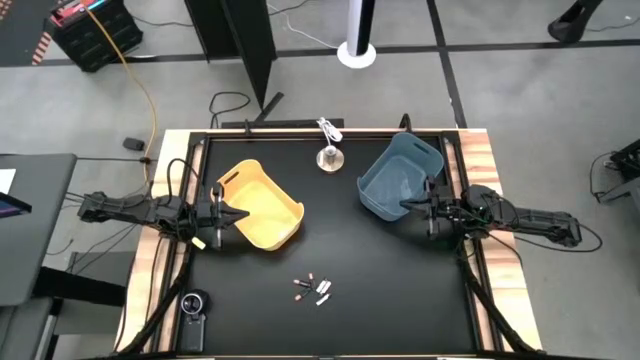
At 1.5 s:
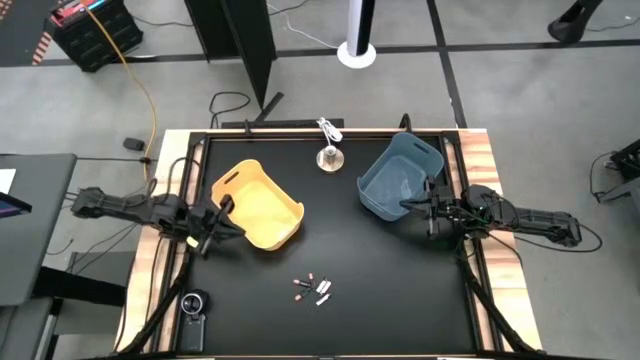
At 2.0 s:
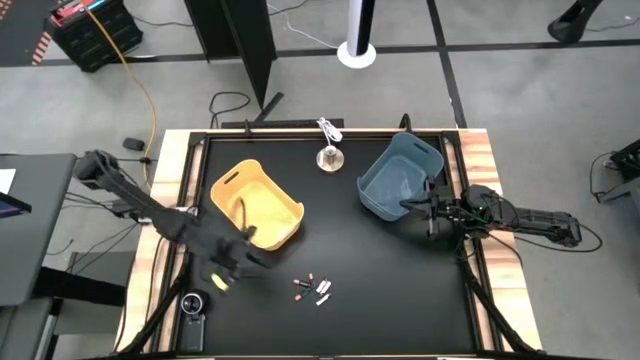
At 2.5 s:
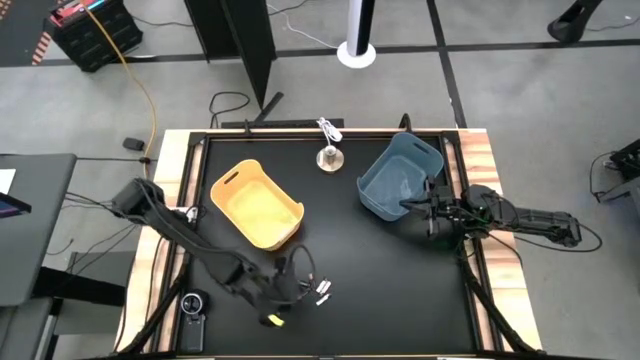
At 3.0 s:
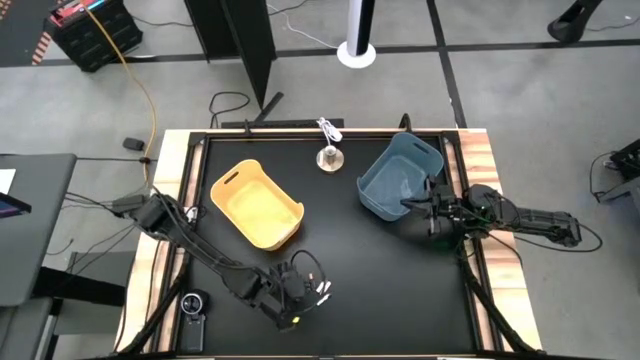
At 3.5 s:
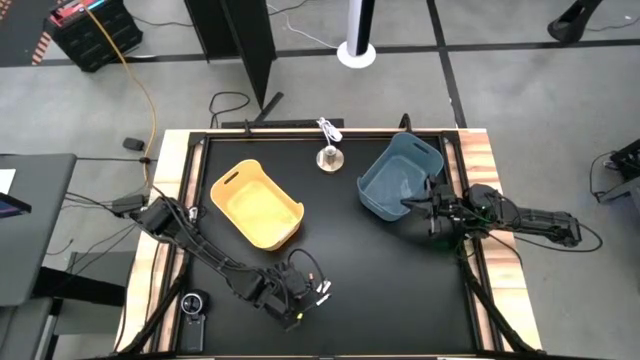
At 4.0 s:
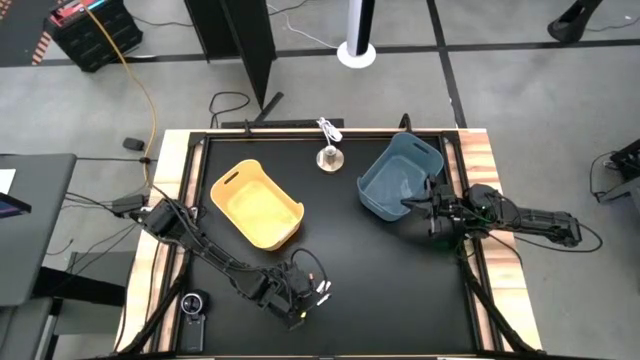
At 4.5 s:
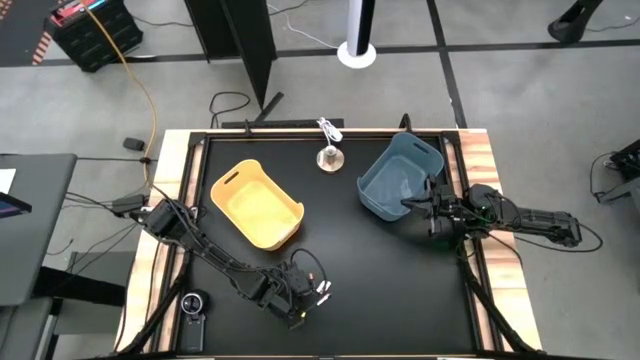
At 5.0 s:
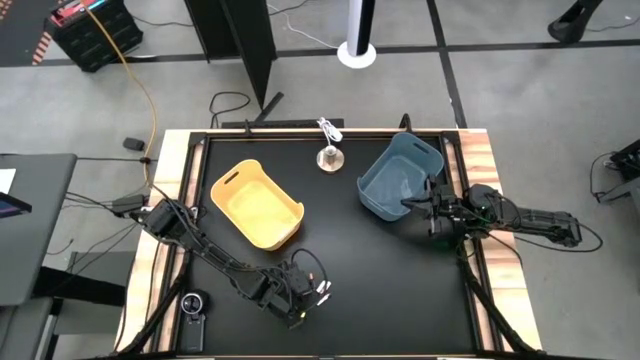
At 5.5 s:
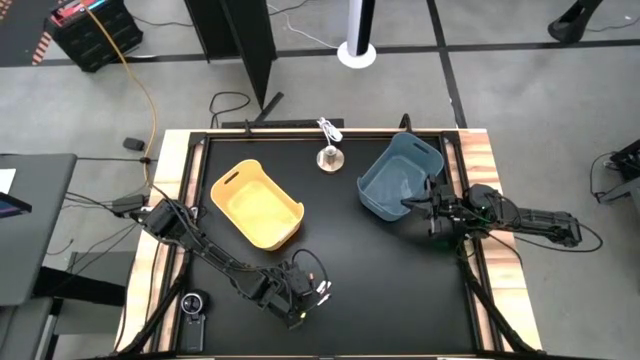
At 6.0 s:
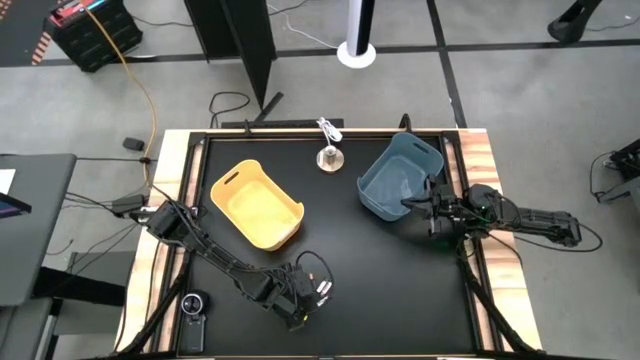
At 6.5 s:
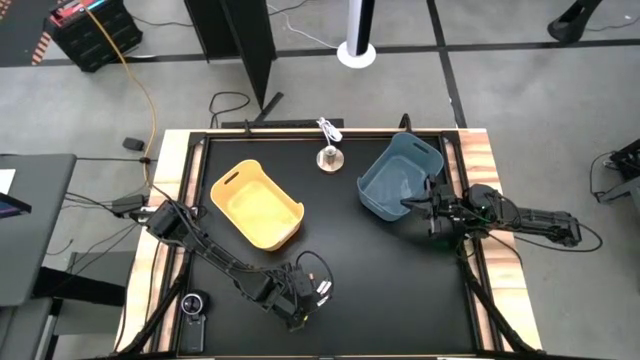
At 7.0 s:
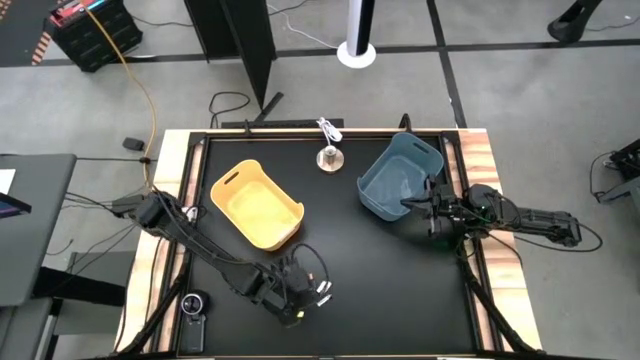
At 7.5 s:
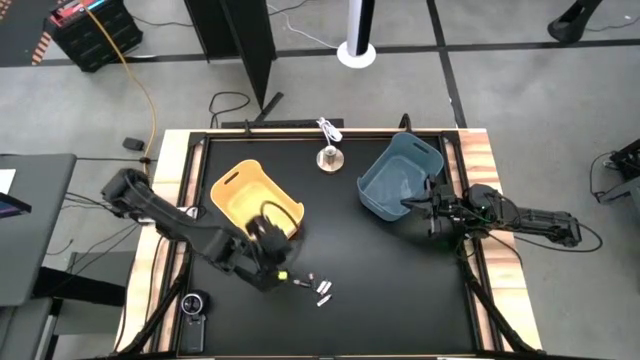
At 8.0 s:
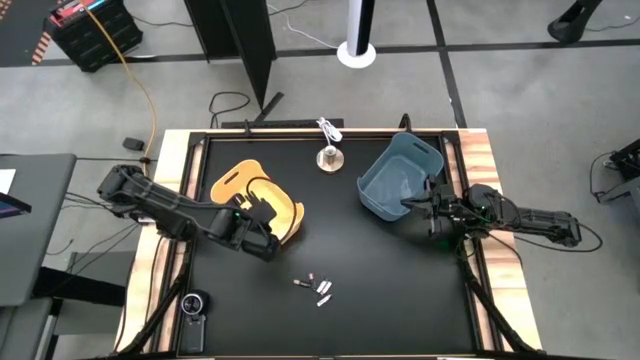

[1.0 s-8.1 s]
Task: Sort batteries
Put the black battery into the yellow bin

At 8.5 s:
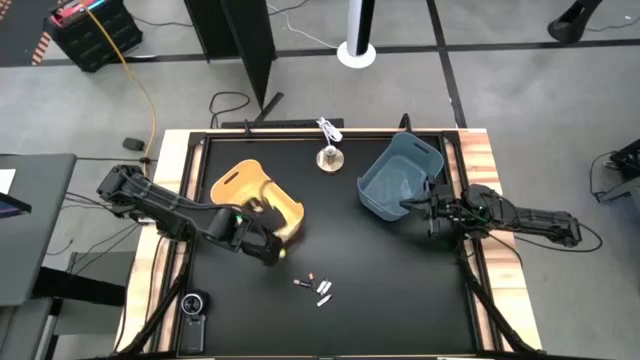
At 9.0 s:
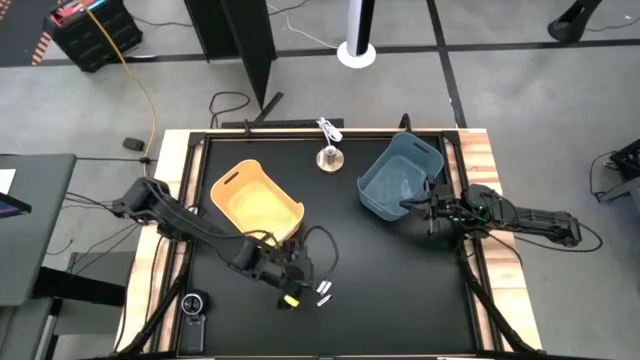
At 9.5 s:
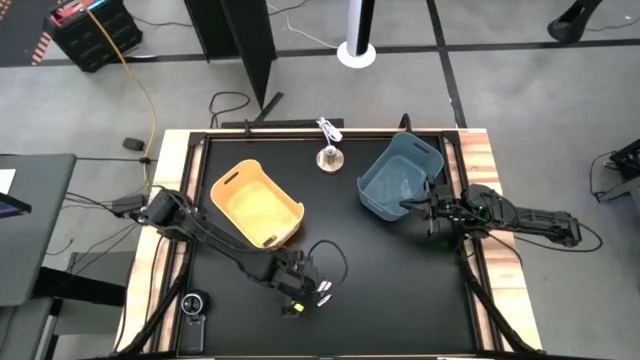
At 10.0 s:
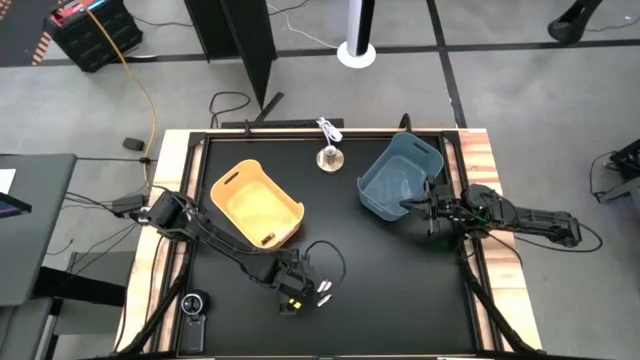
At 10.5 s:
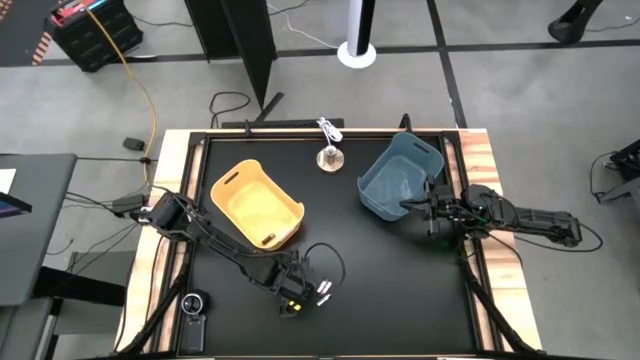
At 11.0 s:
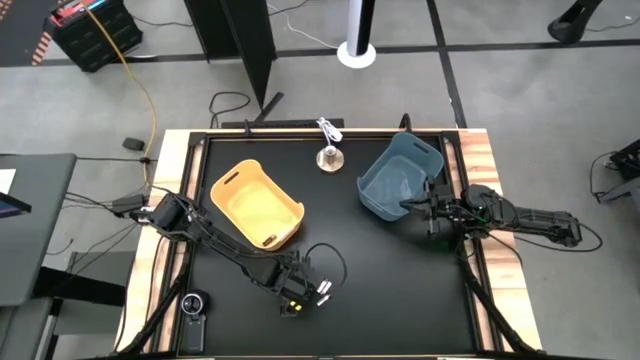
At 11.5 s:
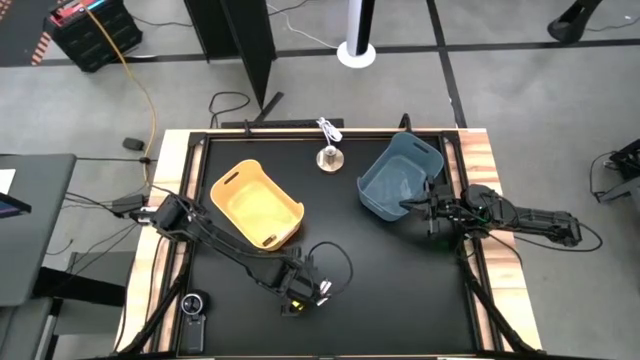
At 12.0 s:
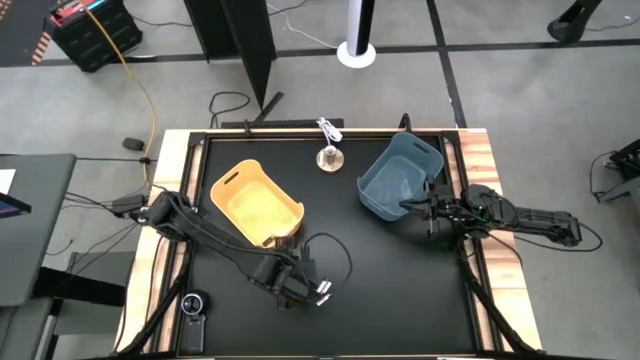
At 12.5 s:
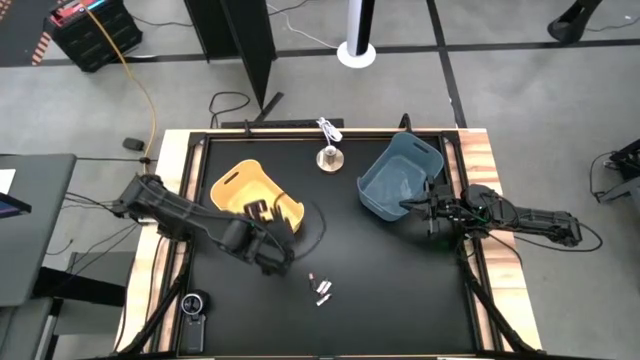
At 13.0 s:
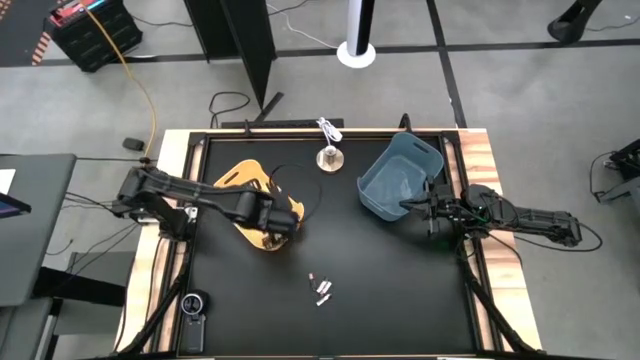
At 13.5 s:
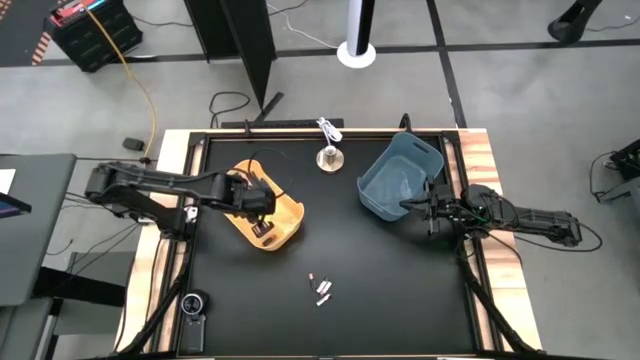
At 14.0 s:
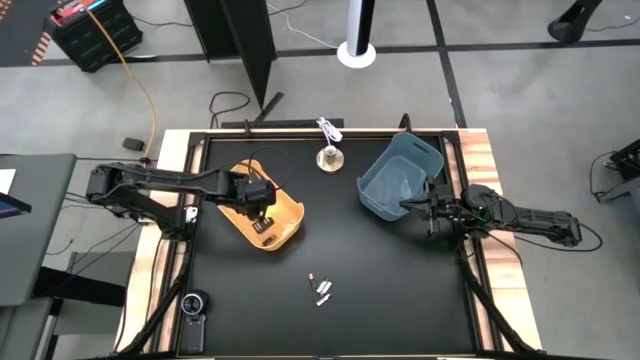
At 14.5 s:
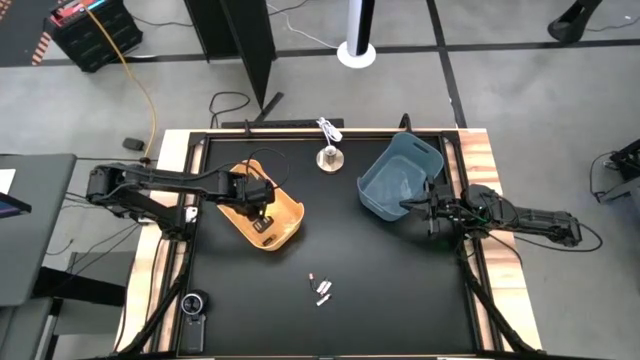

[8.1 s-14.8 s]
Put the black battery into the yellow bin

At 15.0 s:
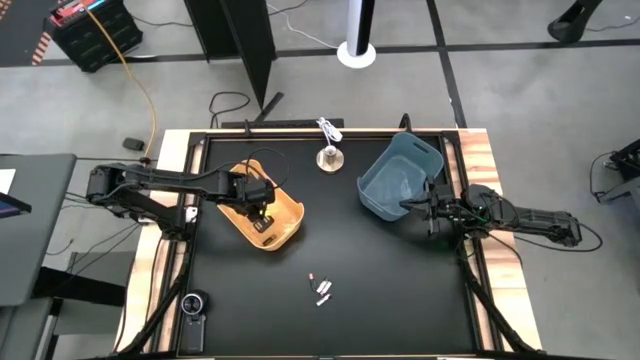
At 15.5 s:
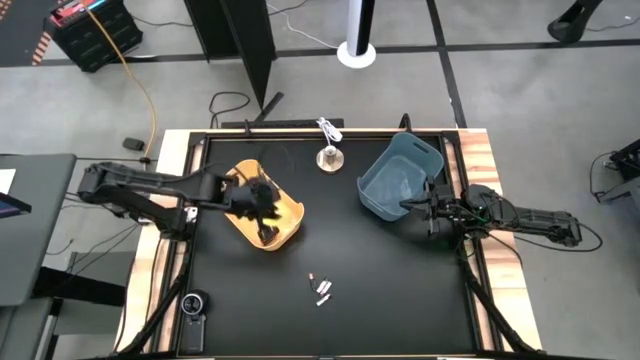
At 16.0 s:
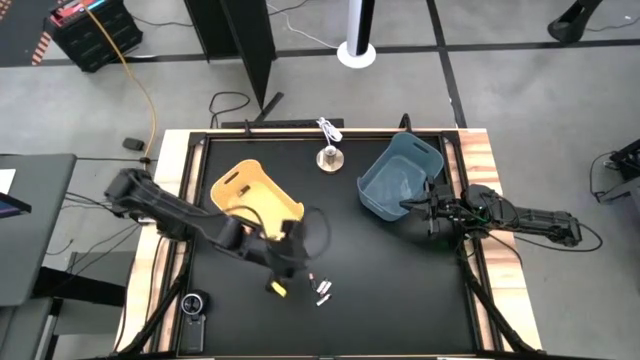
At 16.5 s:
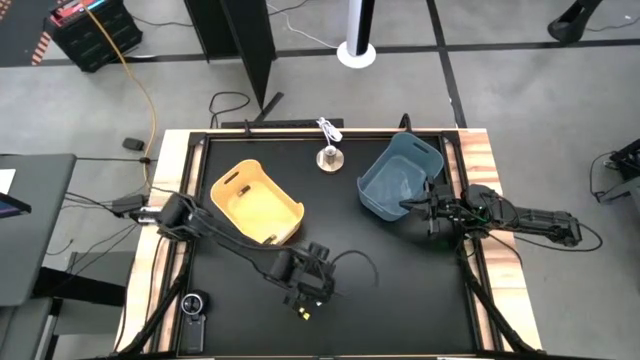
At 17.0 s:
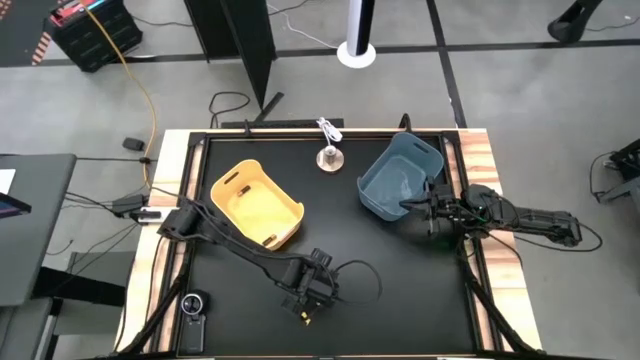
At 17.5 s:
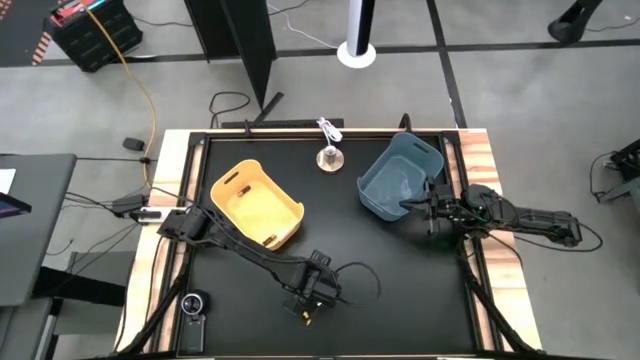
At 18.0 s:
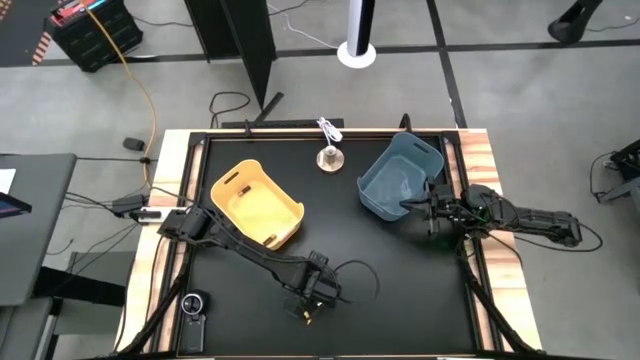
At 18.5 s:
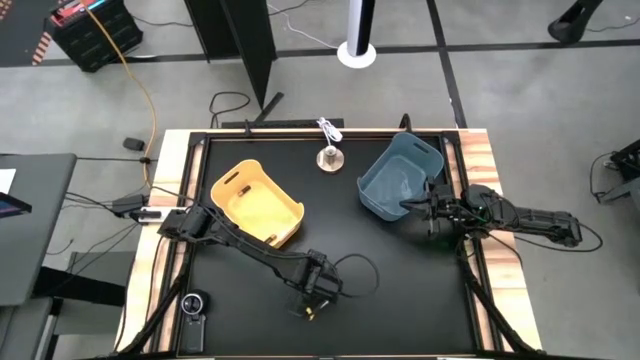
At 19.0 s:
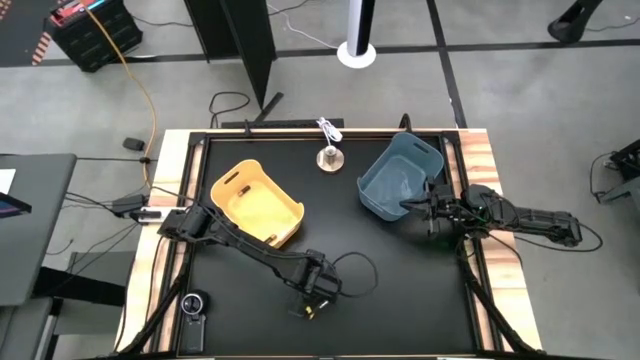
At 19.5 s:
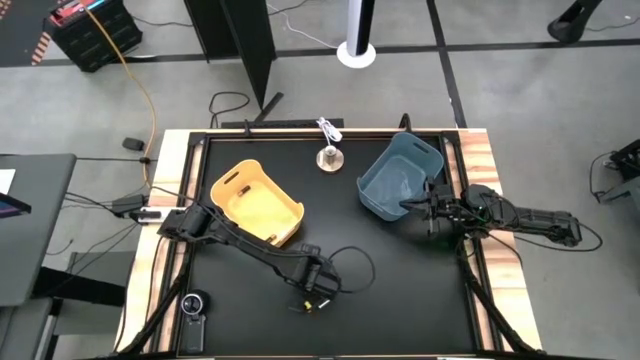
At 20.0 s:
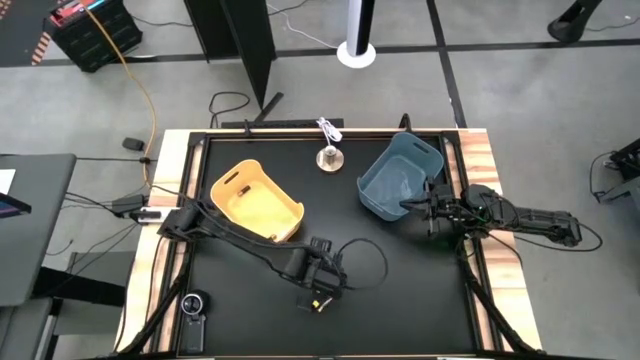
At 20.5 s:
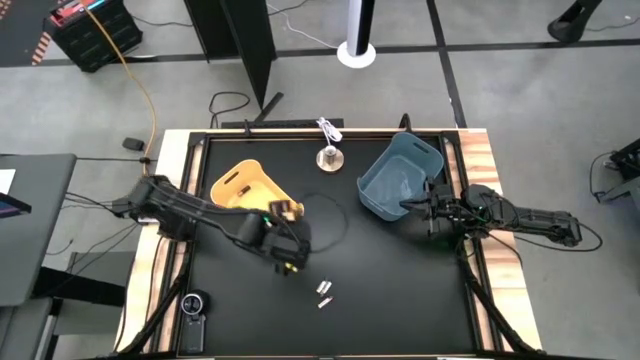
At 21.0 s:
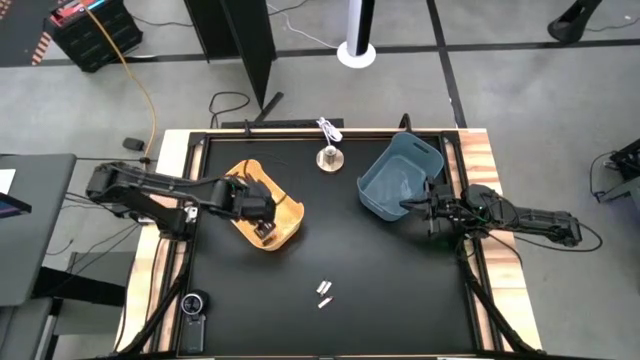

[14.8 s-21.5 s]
Put the black battery into the yellow bin
